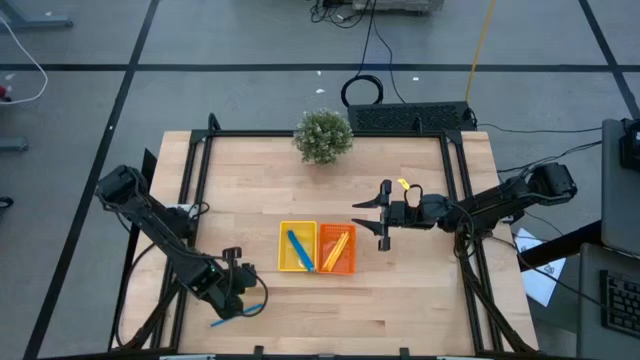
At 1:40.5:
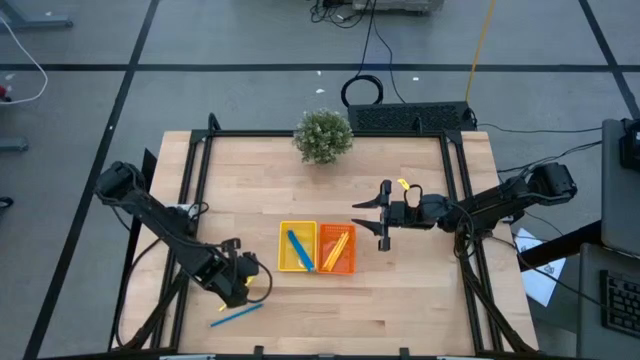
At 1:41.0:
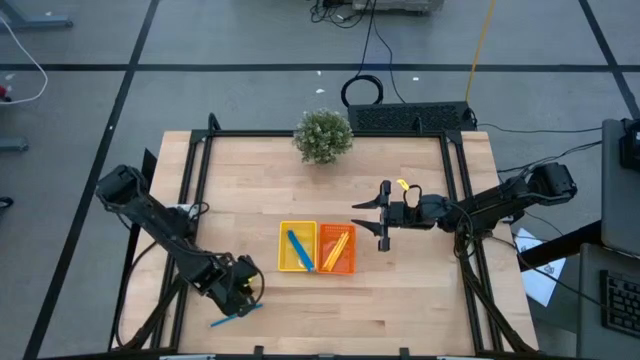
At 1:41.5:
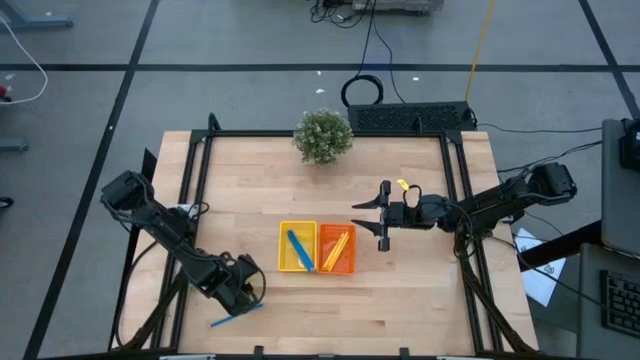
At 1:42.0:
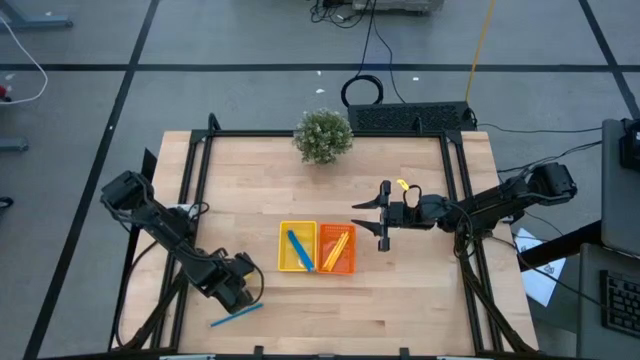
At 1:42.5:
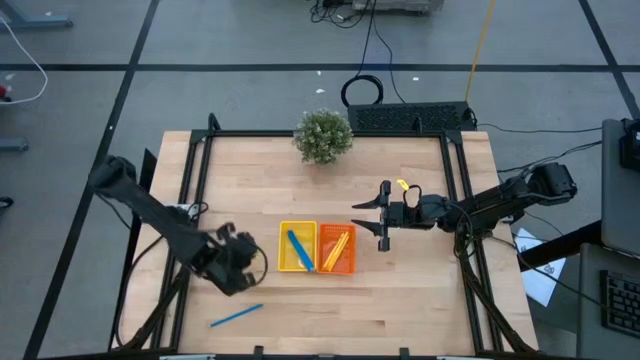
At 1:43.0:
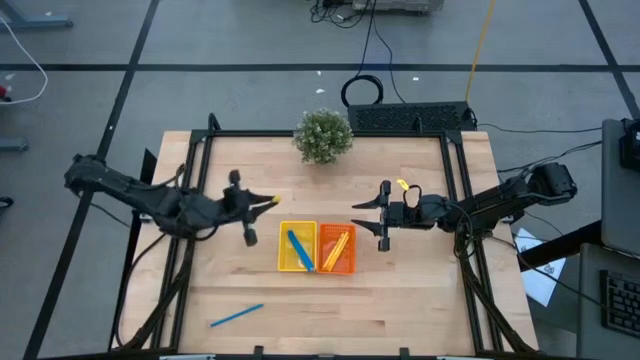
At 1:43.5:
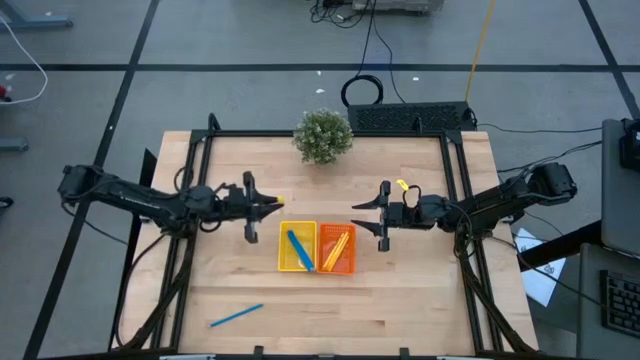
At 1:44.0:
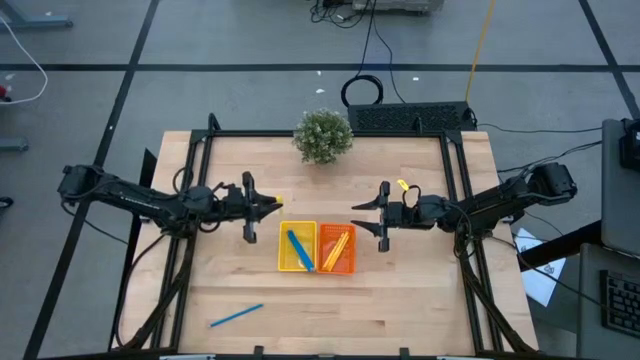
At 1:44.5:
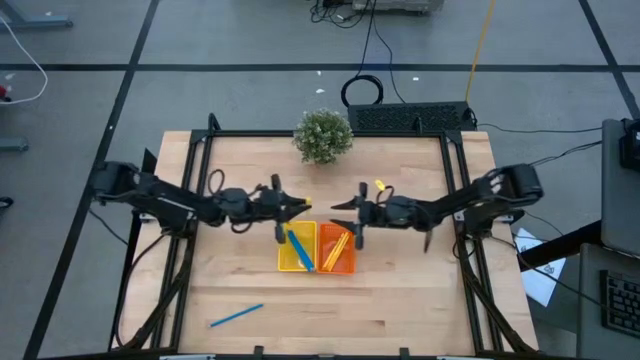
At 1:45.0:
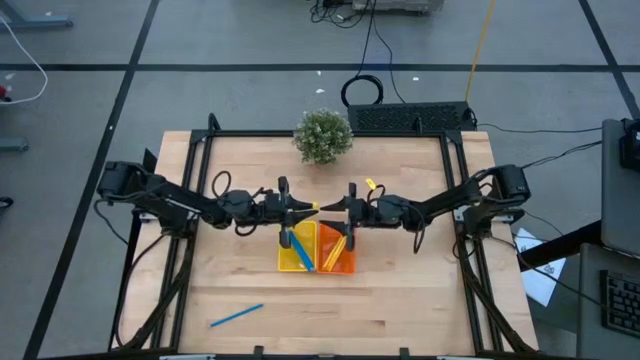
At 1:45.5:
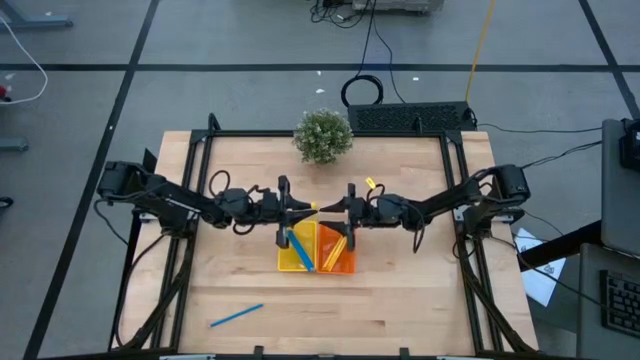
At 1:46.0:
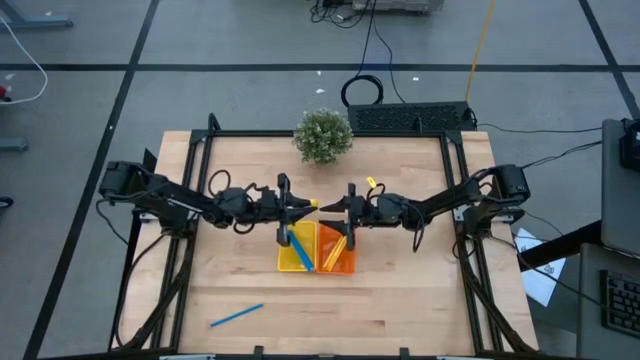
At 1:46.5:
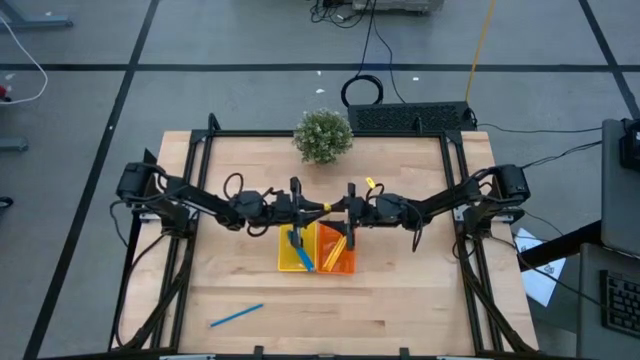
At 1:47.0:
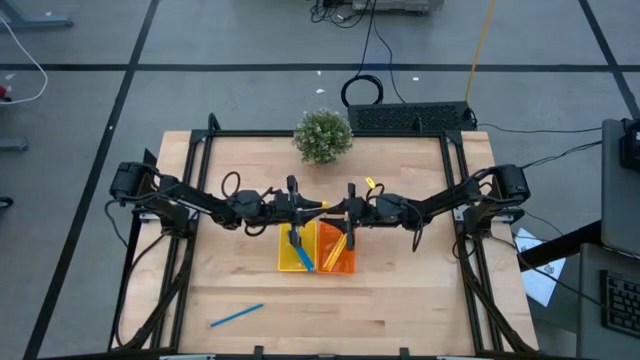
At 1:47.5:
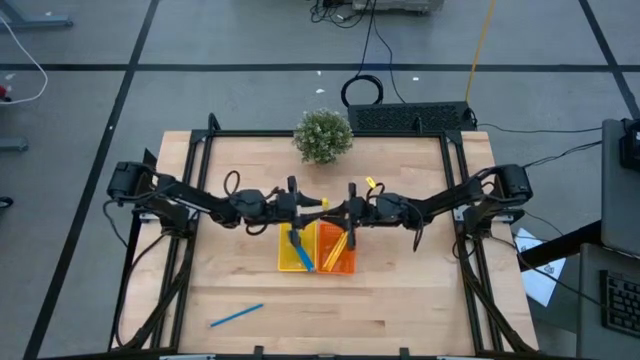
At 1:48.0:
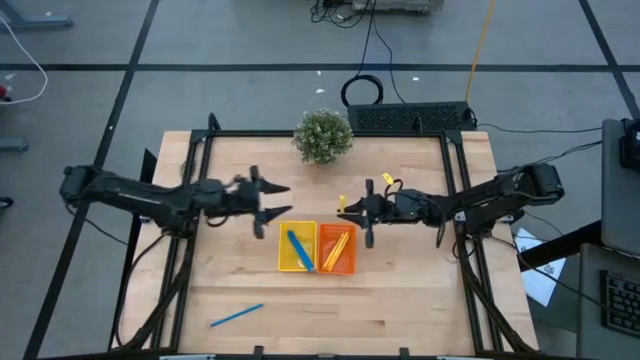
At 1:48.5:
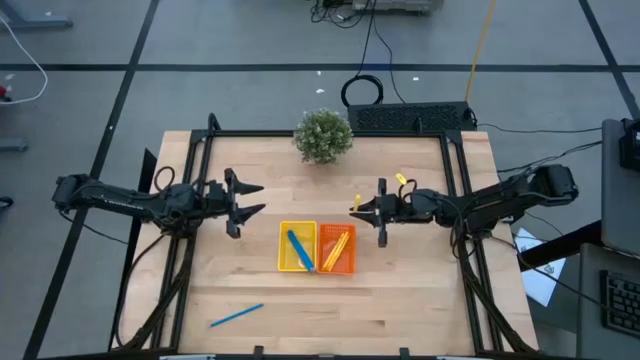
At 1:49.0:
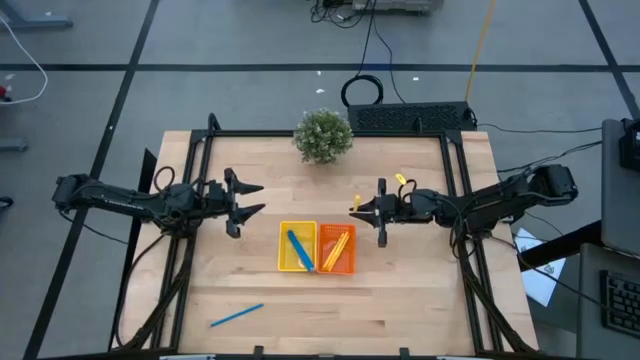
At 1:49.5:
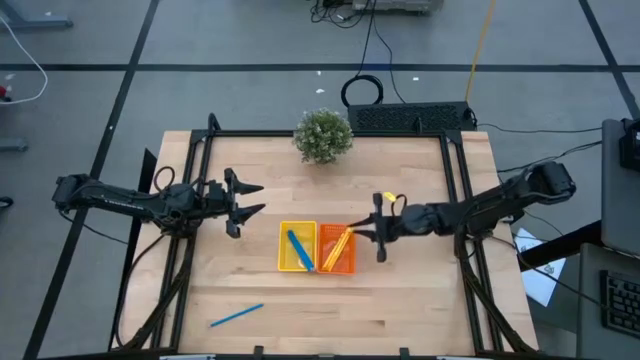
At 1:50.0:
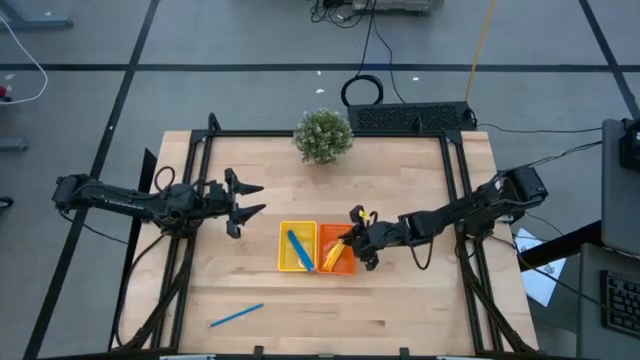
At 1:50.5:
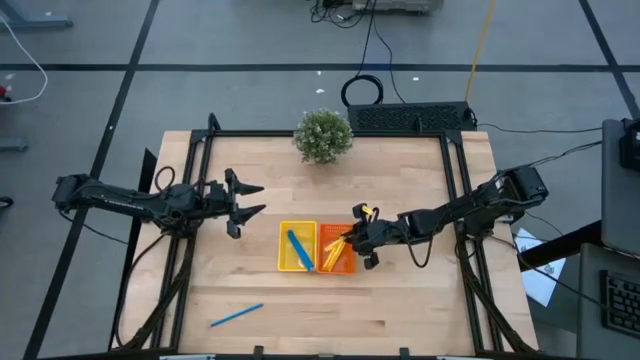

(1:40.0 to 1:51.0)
Task: Sort pens & pencils
Put the yellow pen into the orange bin

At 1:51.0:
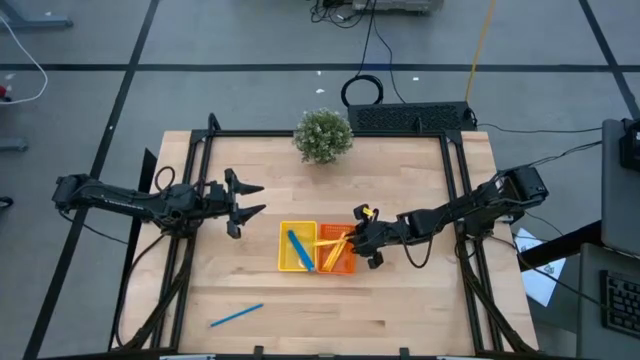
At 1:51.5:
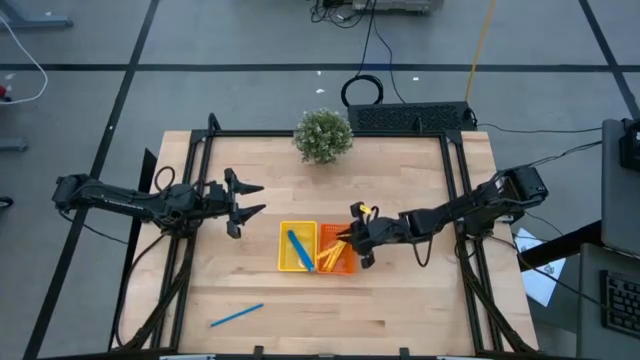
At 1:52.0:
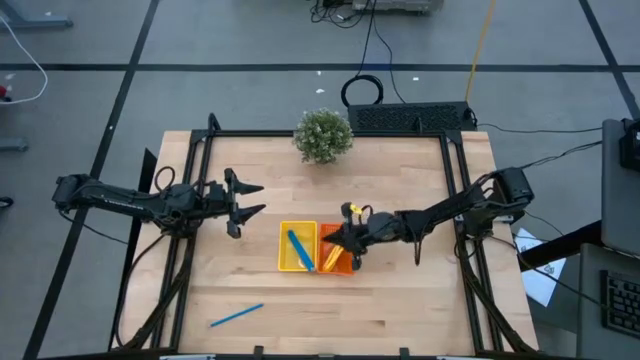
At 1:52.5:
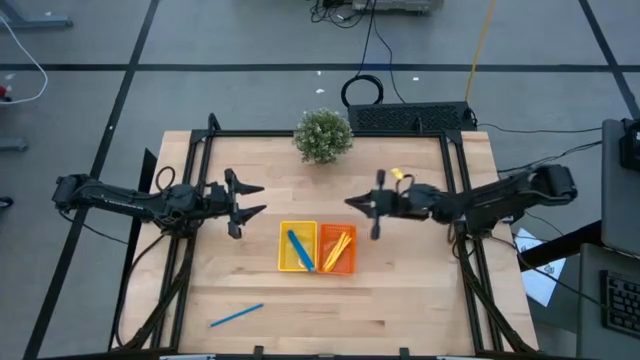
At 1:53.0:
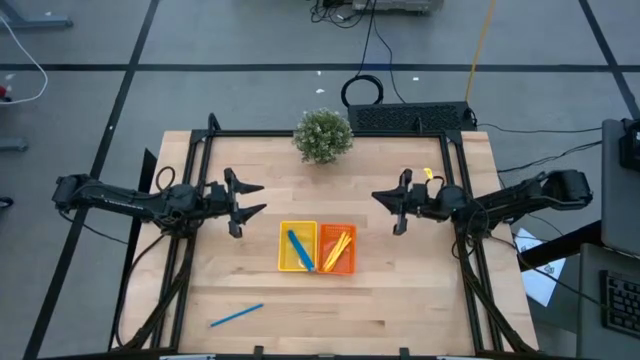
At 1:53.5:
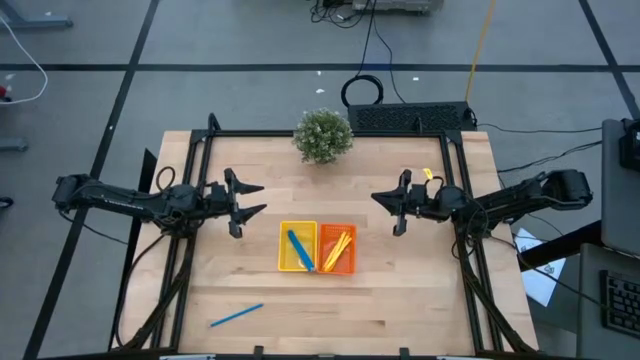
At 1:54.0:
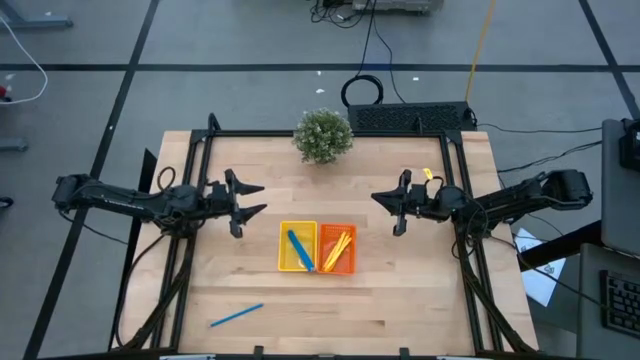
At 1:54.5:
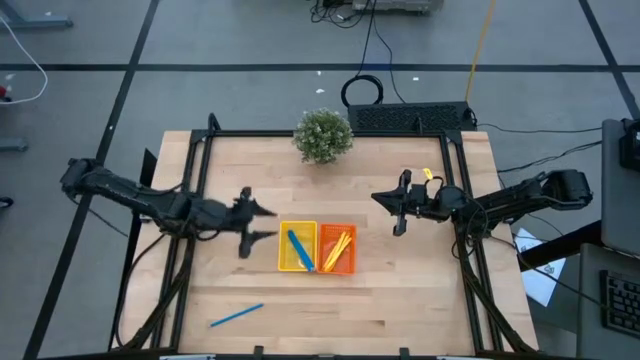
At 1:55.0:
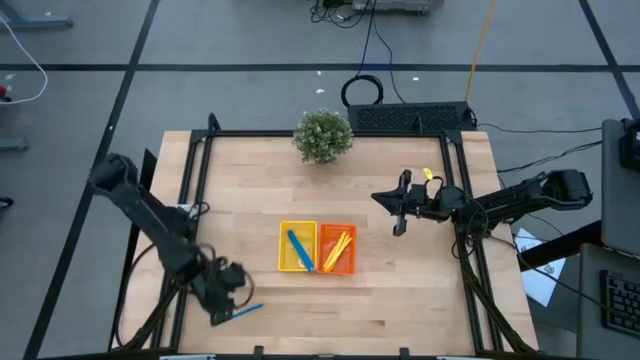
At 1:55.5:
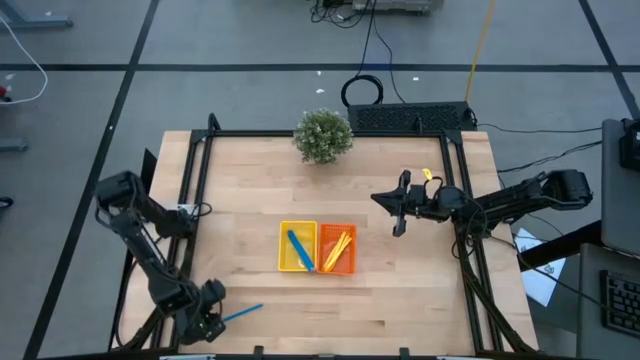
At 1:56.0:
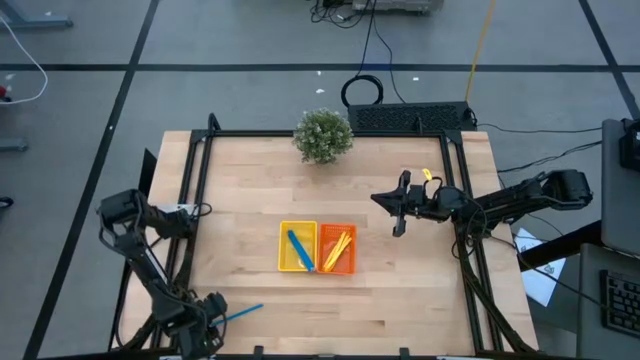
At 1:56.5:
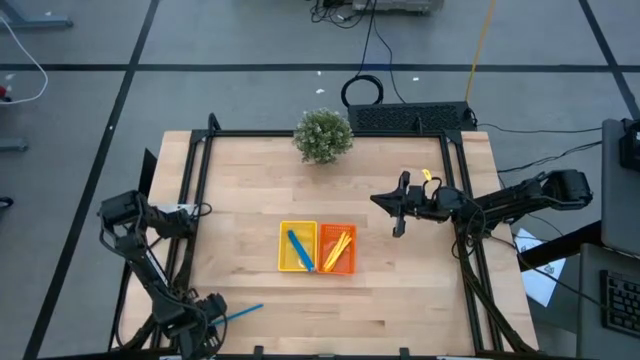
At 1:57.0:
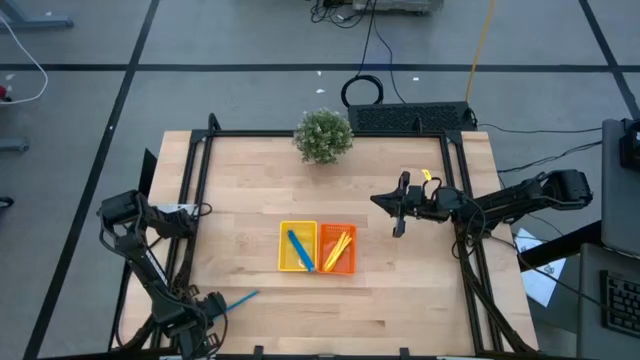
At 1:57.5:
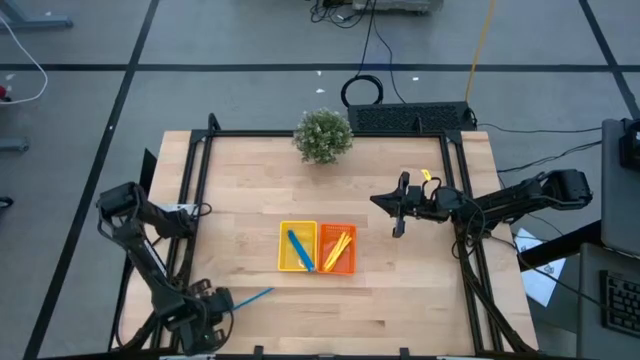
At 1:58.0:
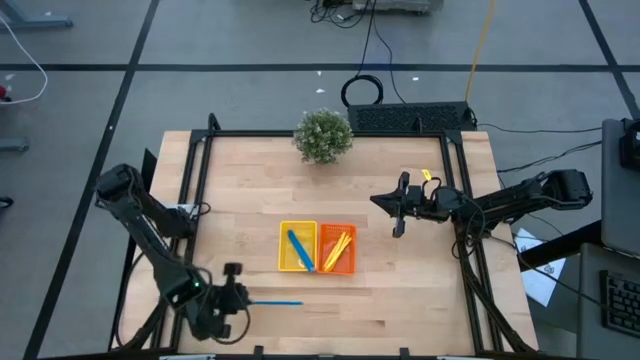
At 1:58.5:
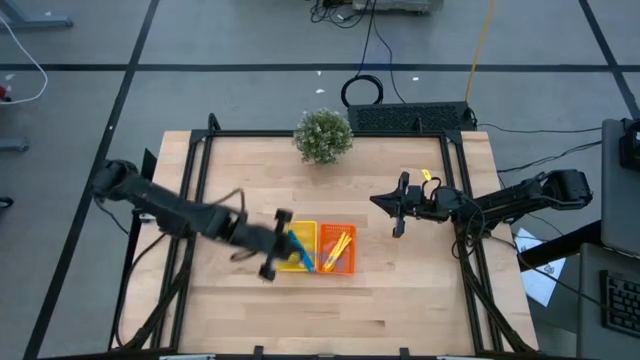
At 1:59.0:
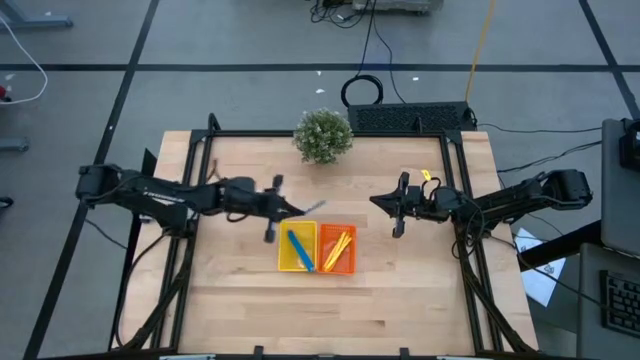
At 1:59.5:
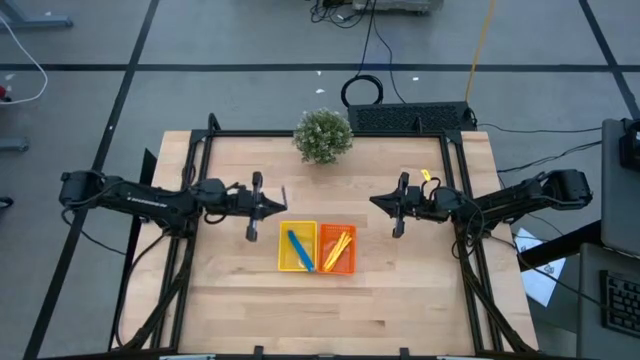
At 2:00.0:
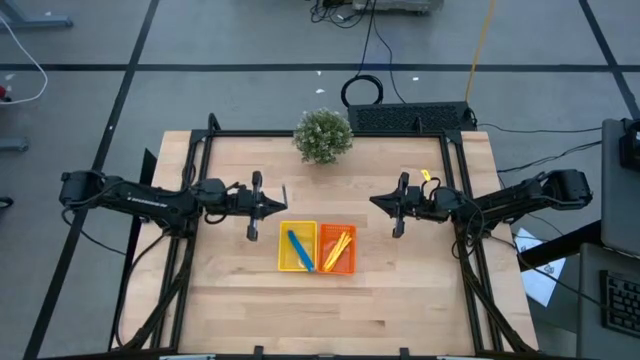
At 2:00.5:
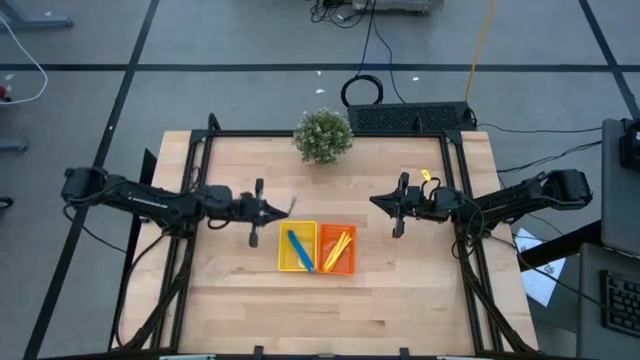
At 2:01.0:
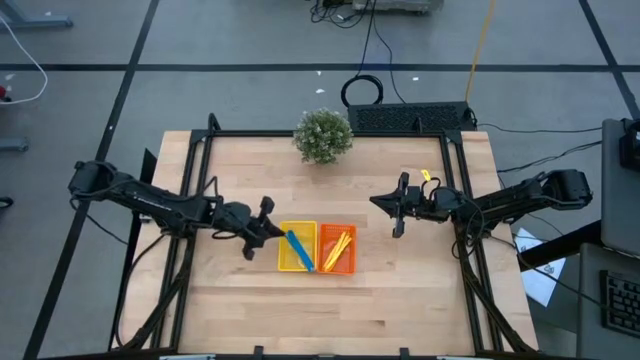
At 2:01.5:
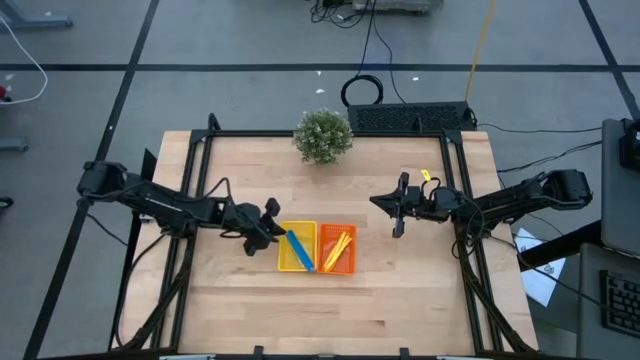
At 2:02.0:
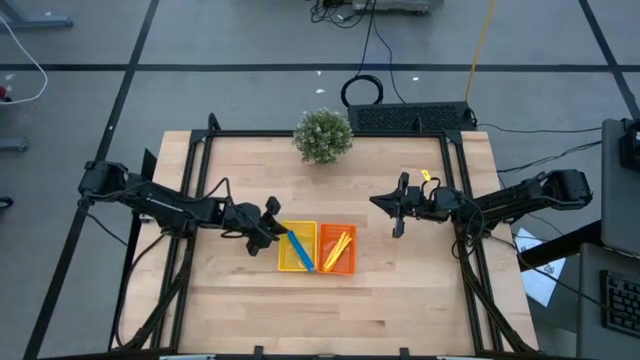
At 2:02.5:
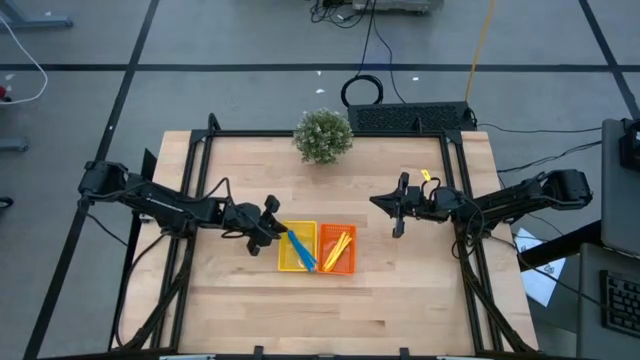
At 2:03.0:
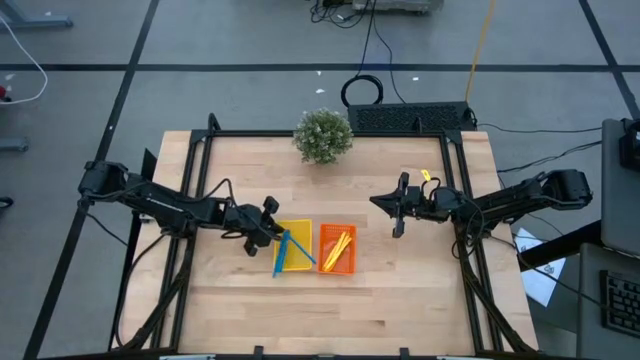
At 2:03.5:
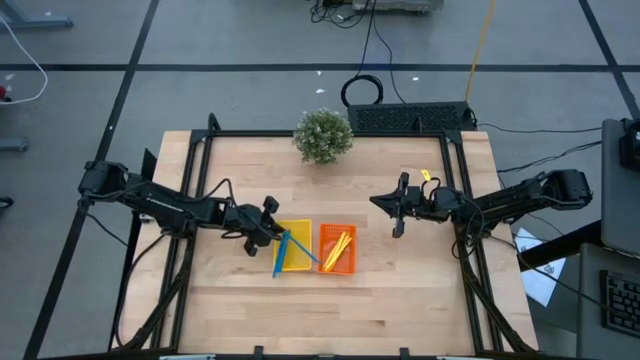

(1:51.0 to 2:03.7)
Put the blue pencil into the yellow bin
